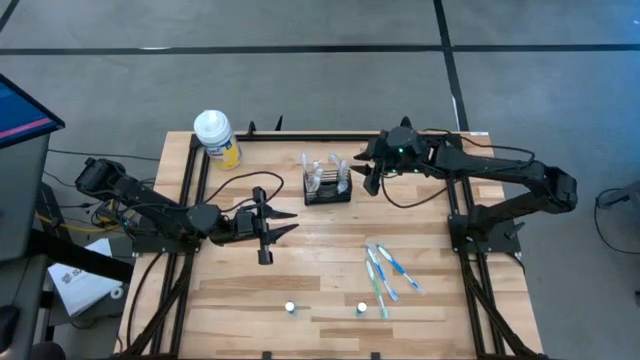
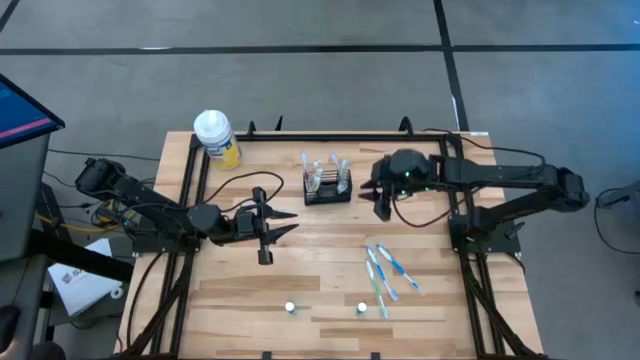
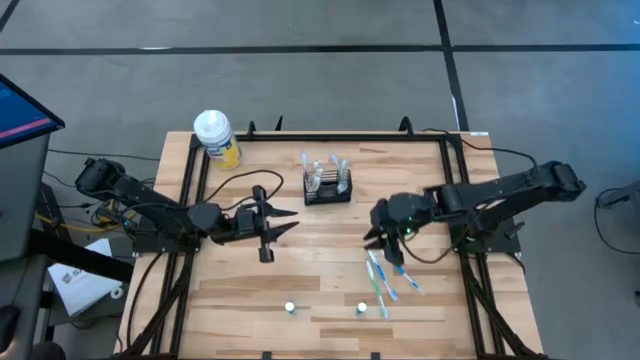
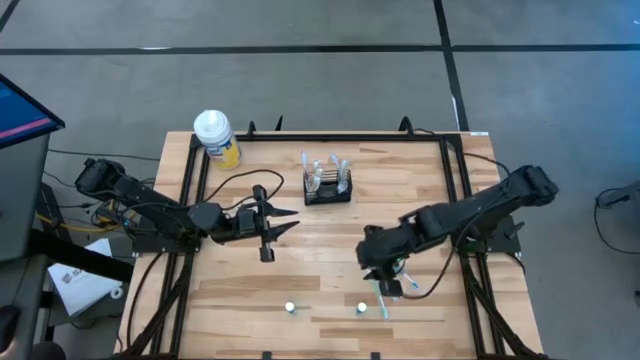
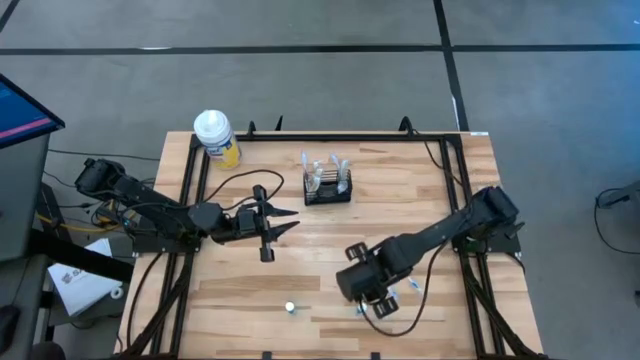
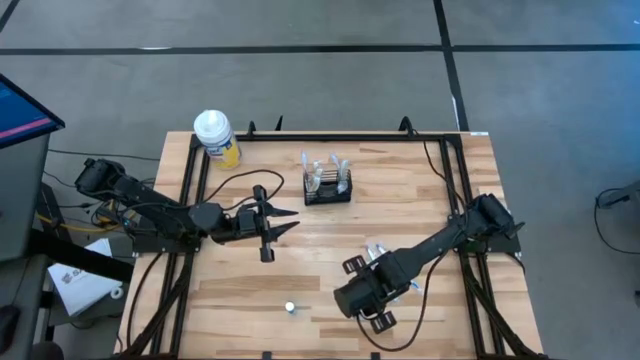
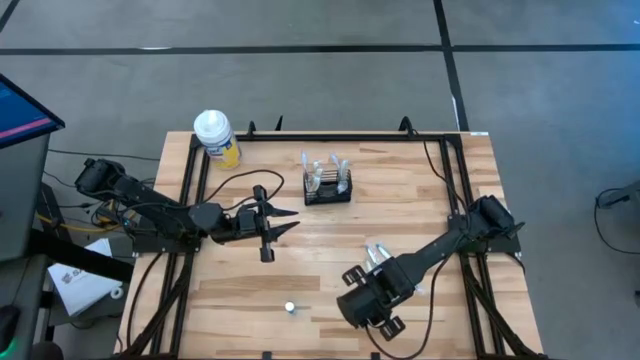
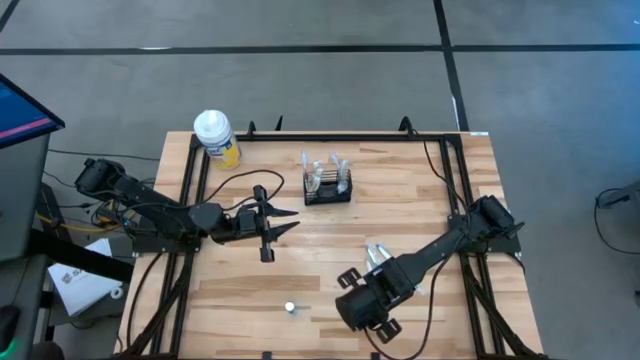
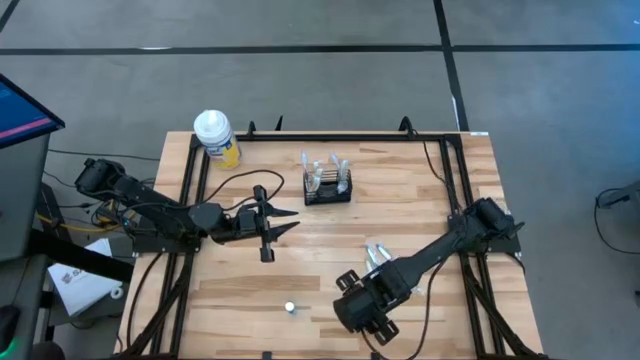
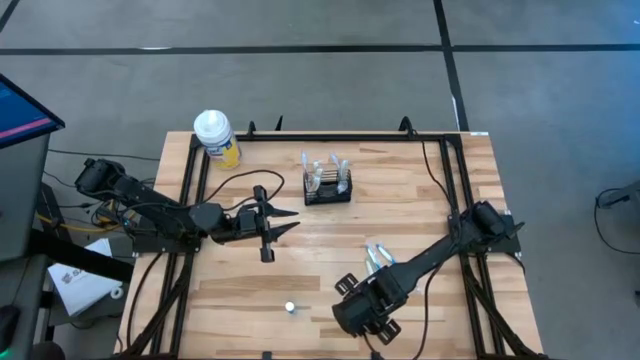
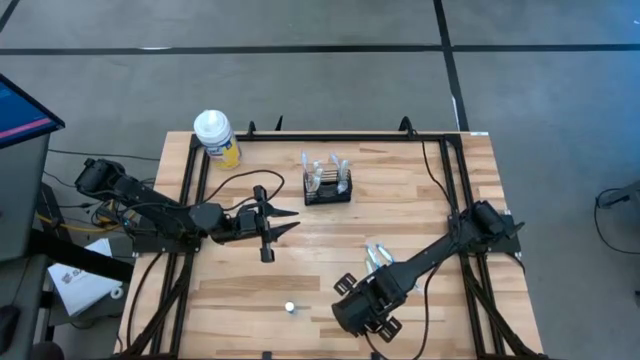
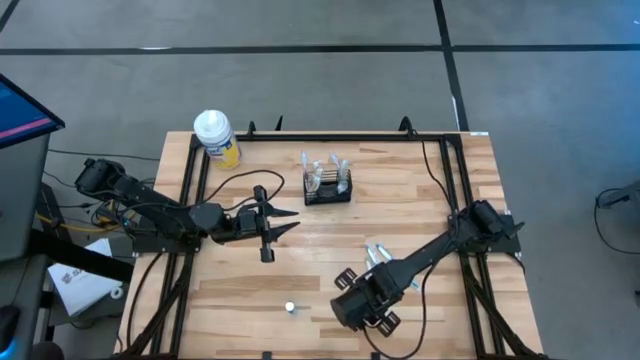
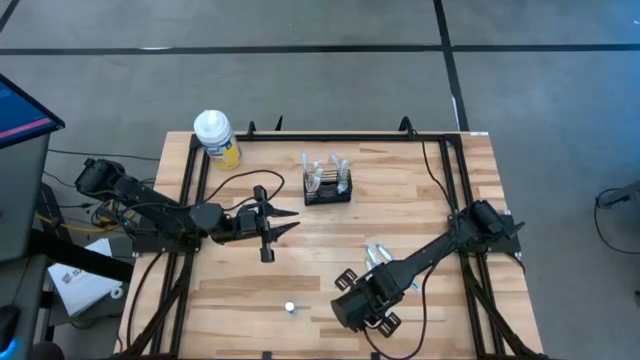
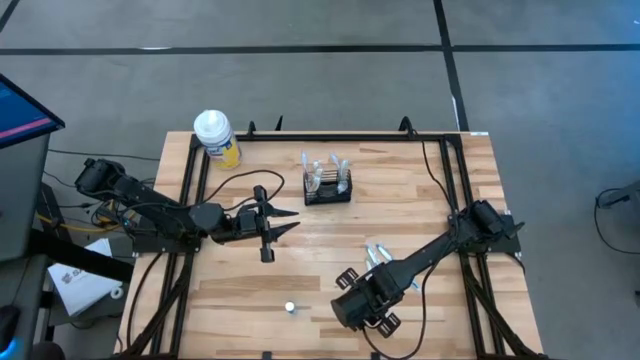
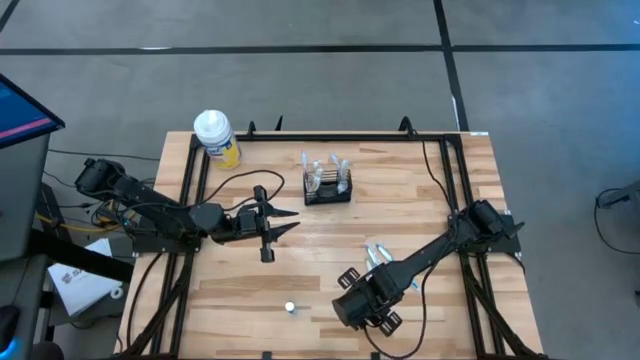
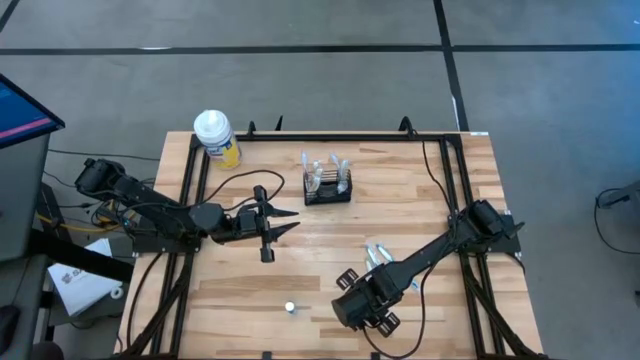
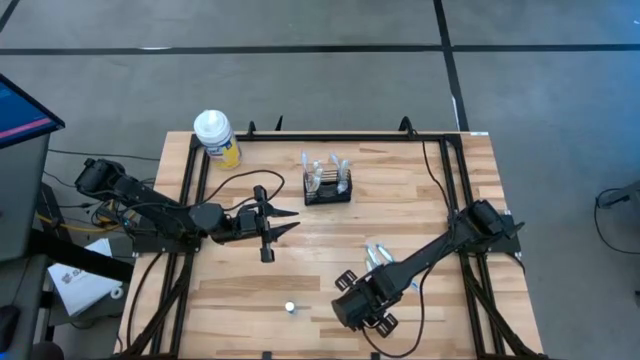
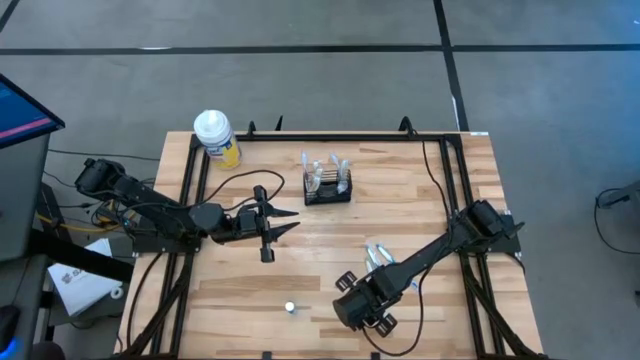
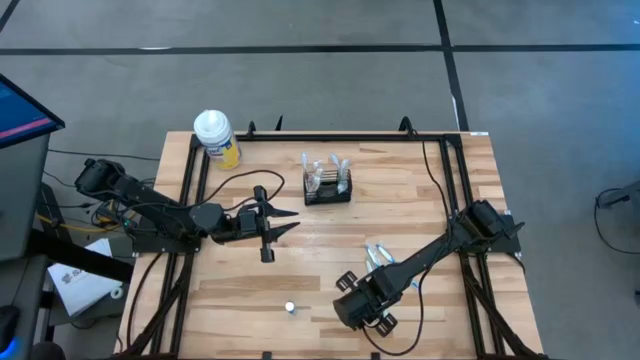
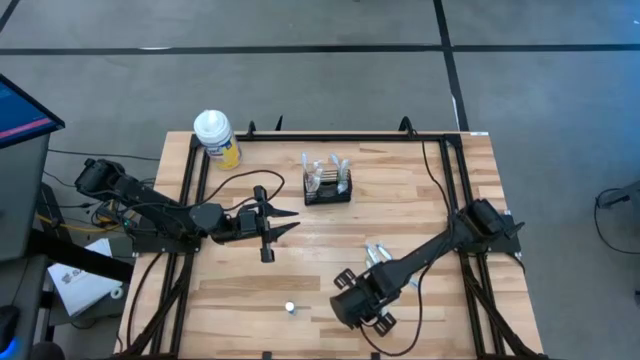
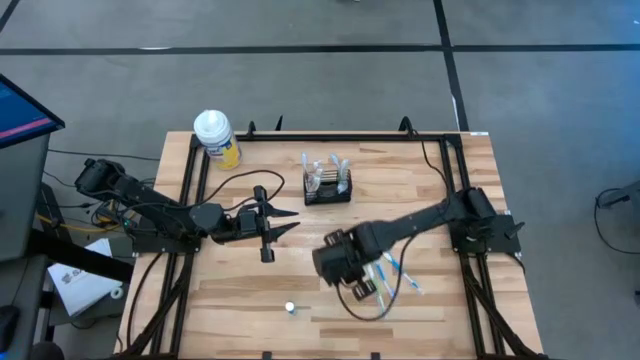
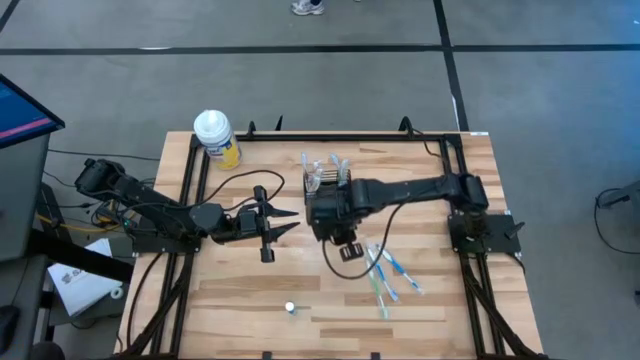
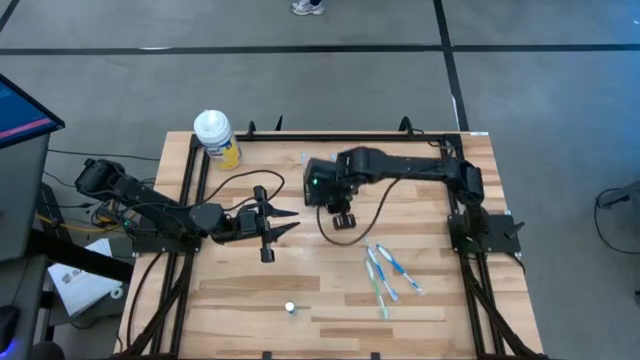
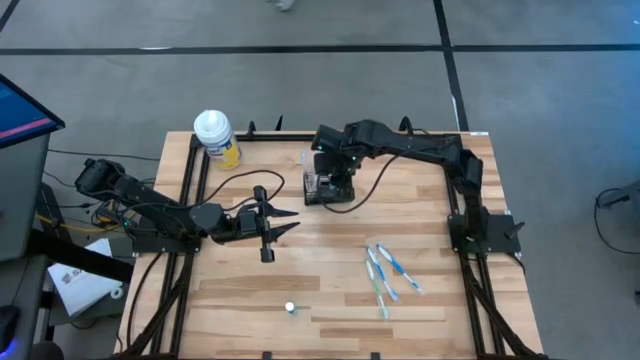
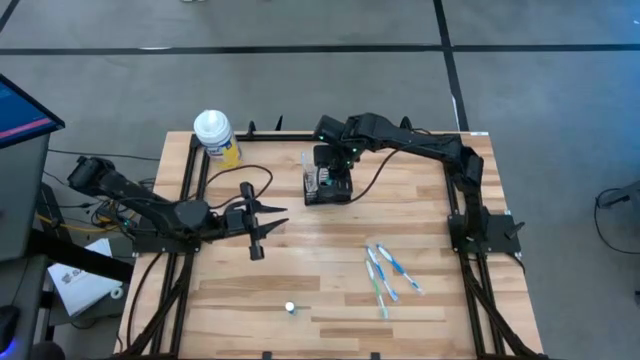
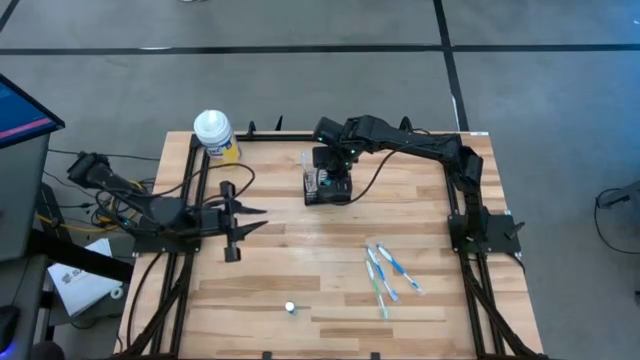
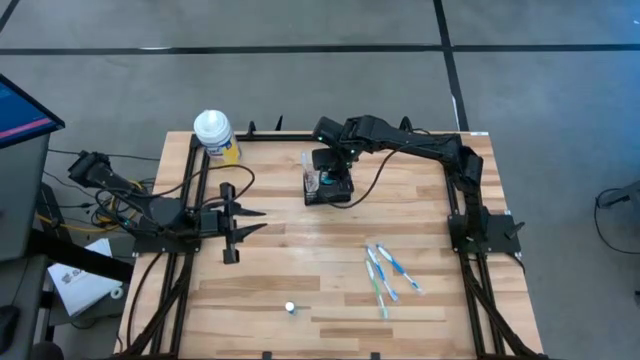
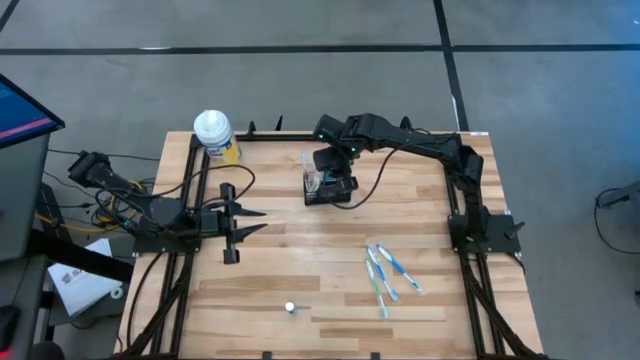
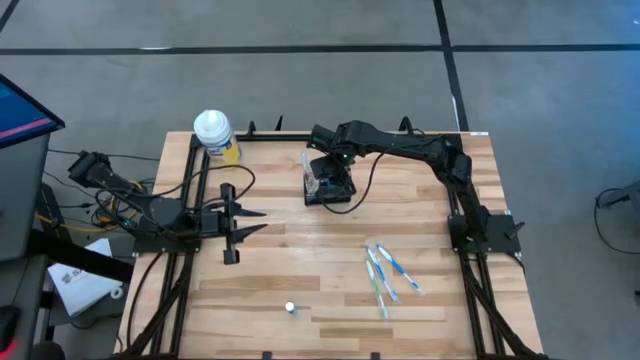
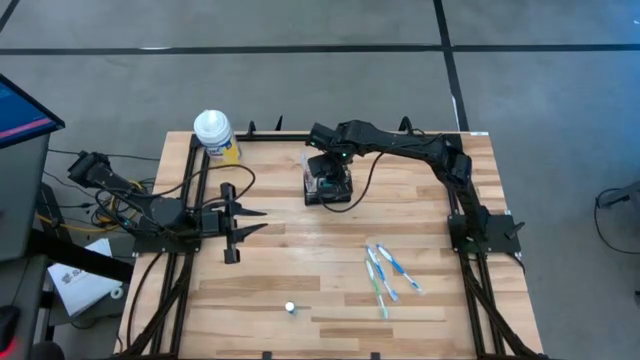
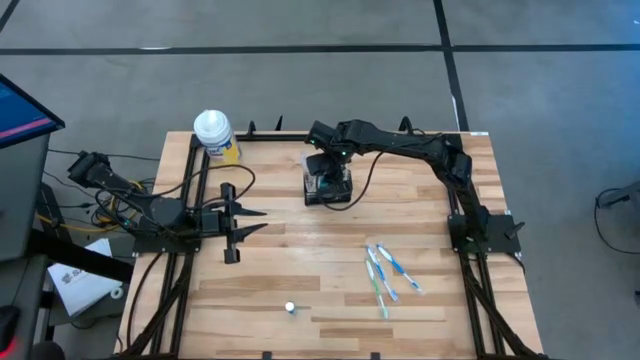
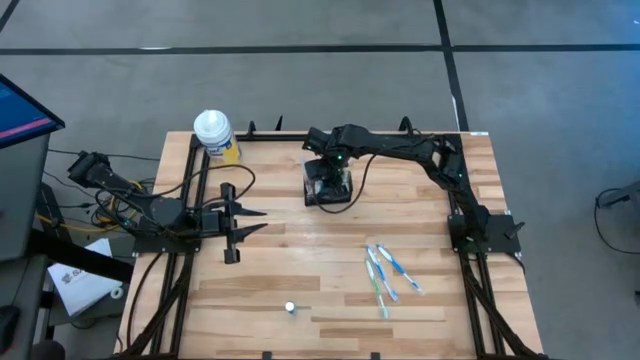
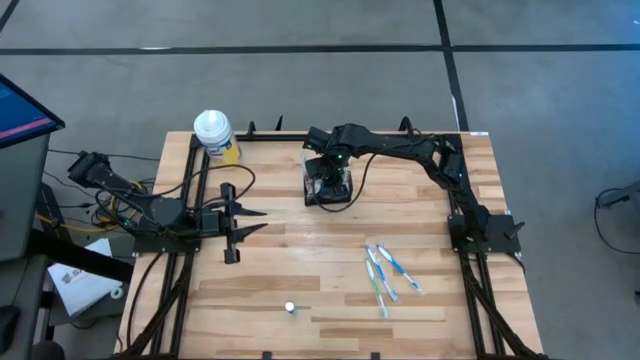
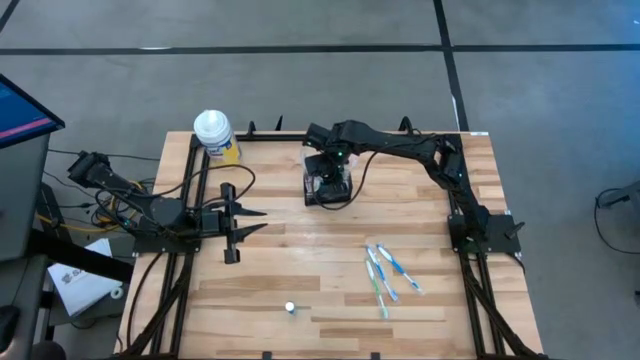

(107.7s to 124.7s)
Task: Pick & Place toothbrushing station
Put the mouthwash into the black mesh organizer

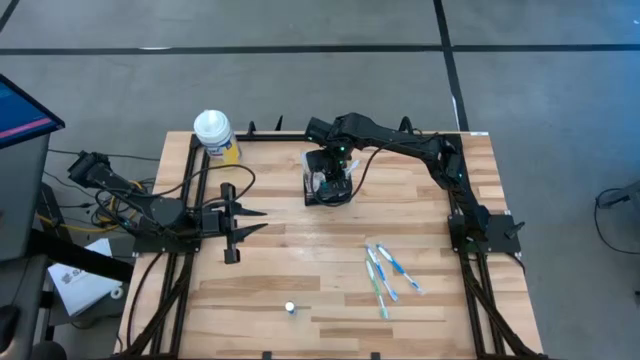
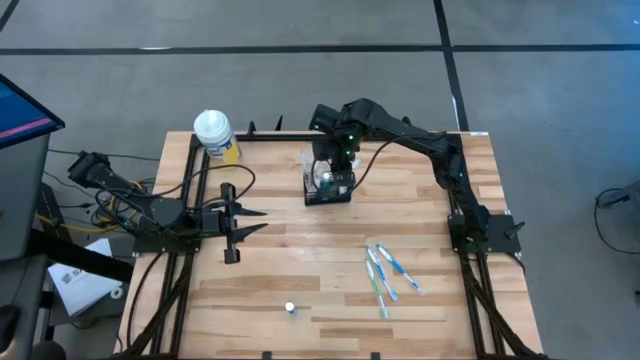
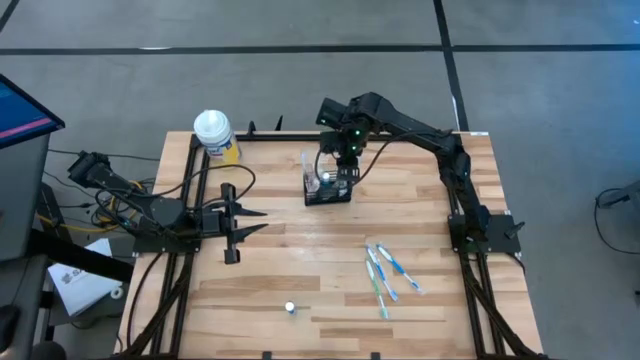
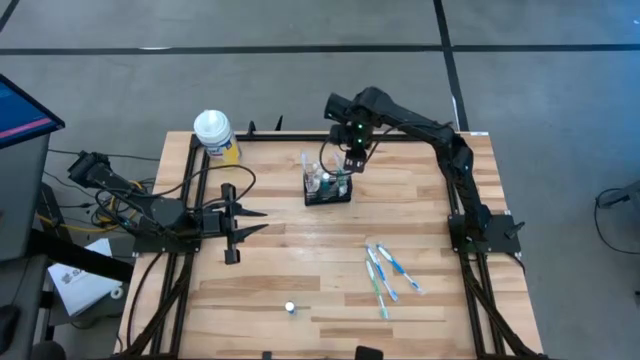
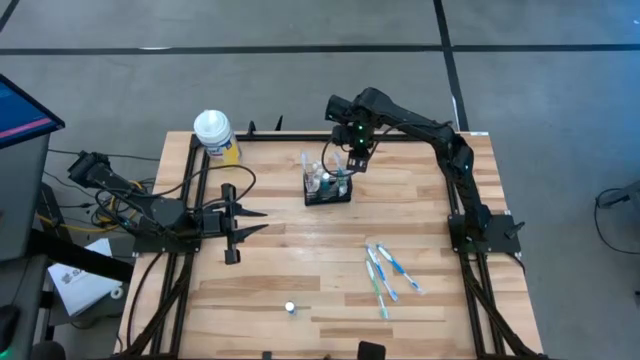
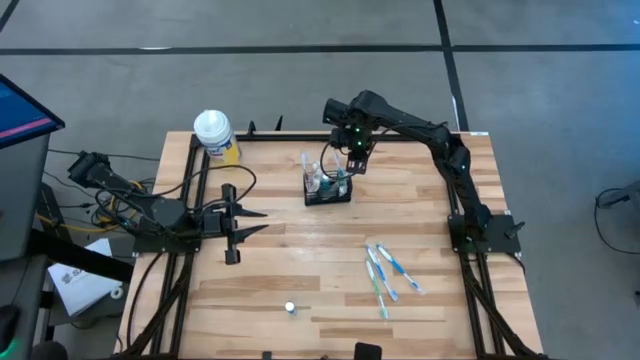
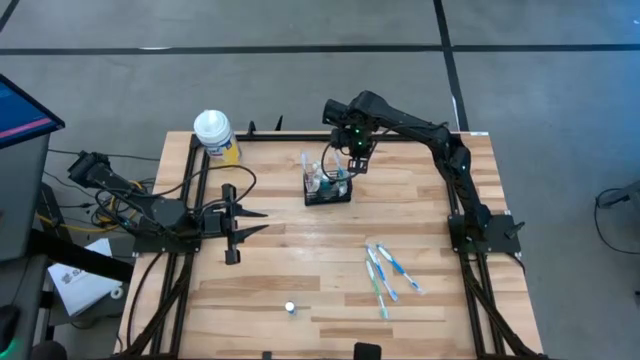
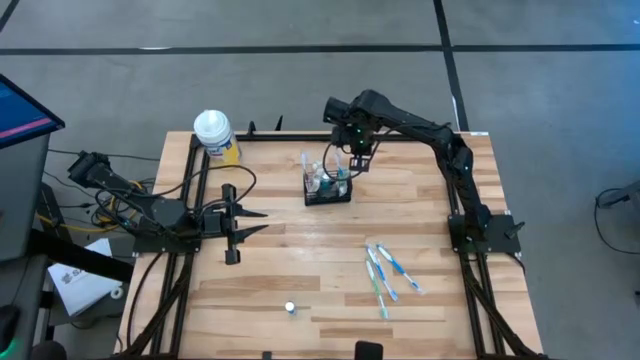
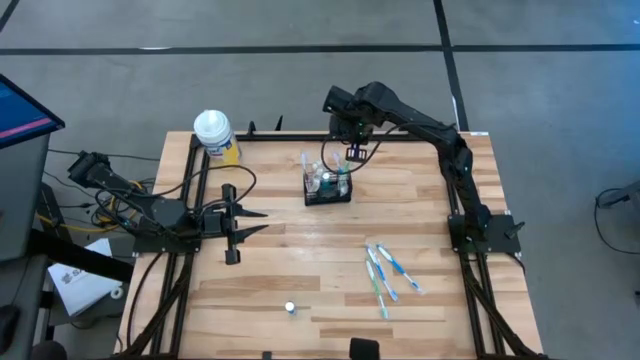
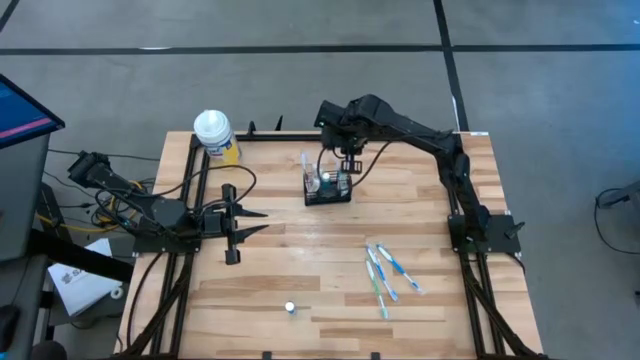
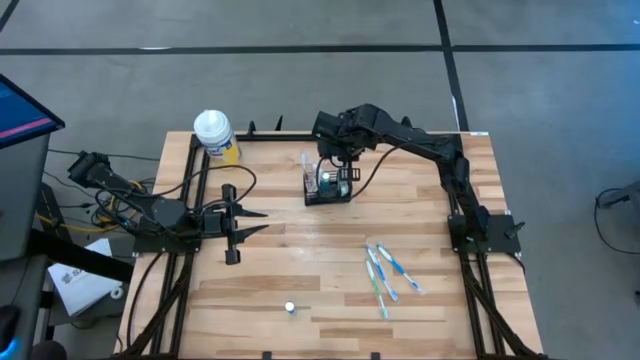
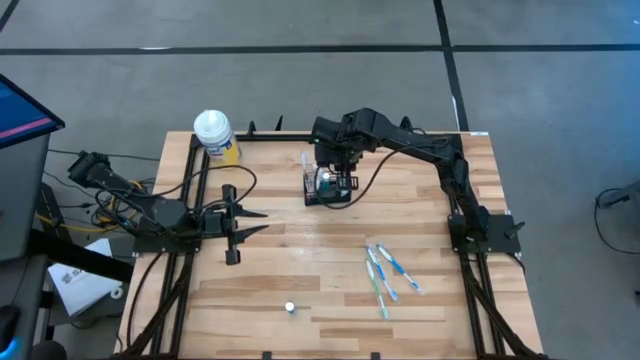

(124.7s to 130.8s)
Adjust the green toothbrush in the black mesh organizer
